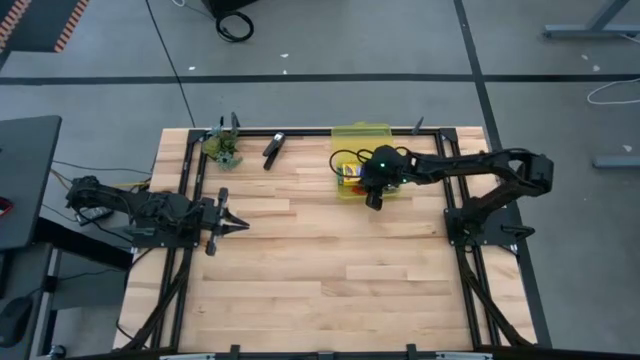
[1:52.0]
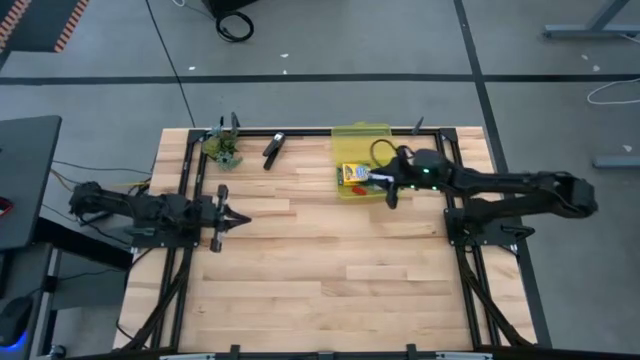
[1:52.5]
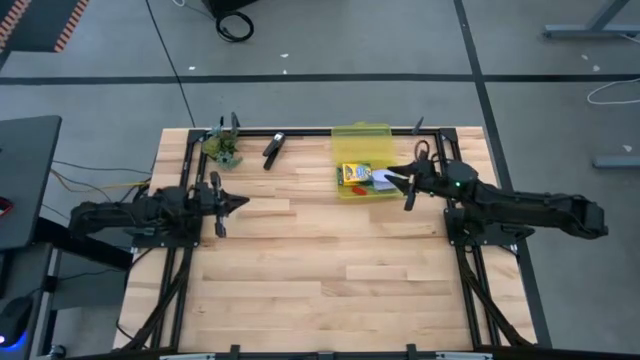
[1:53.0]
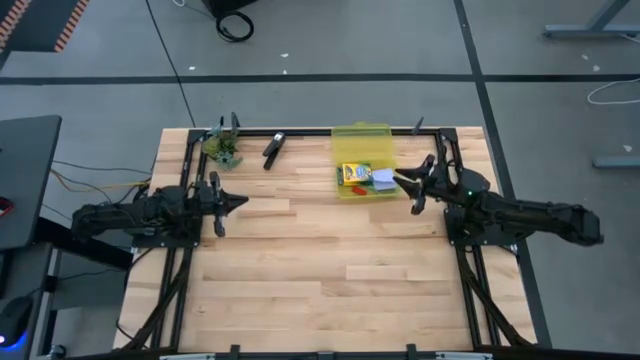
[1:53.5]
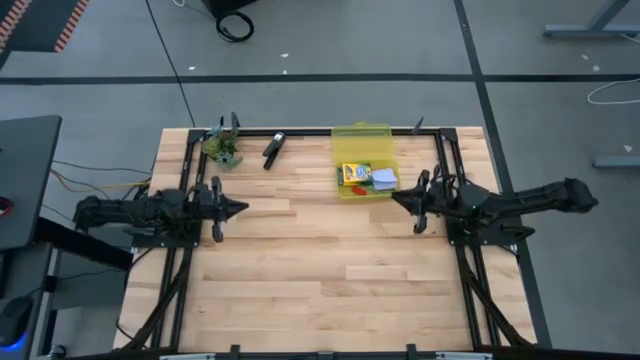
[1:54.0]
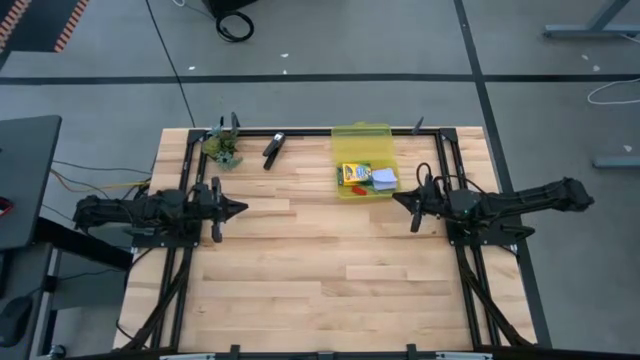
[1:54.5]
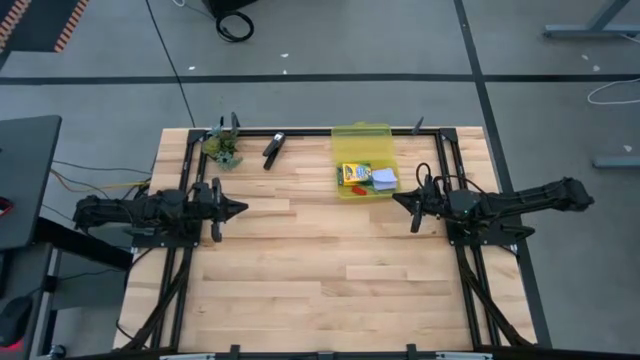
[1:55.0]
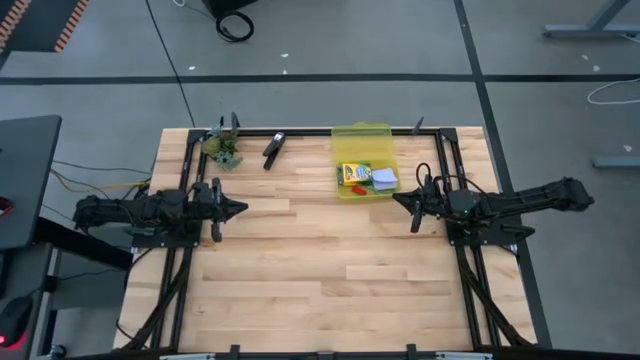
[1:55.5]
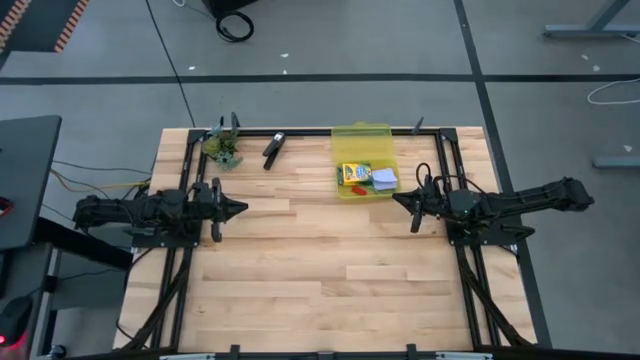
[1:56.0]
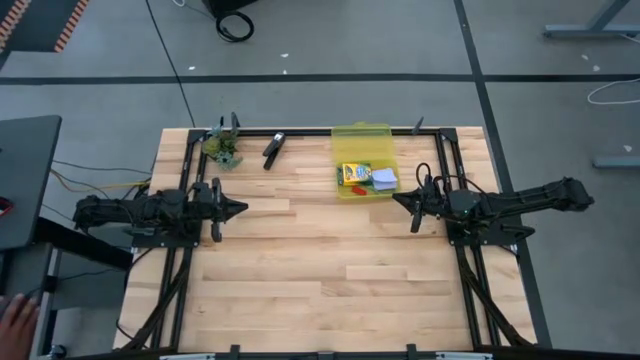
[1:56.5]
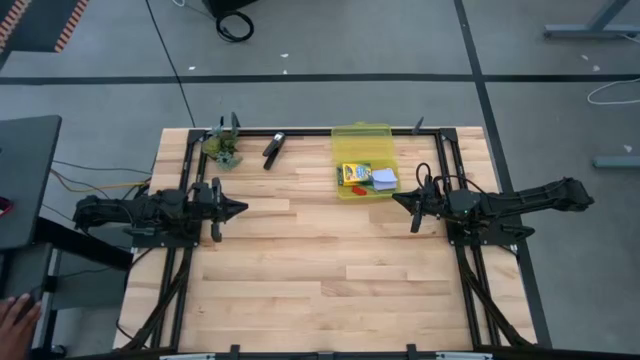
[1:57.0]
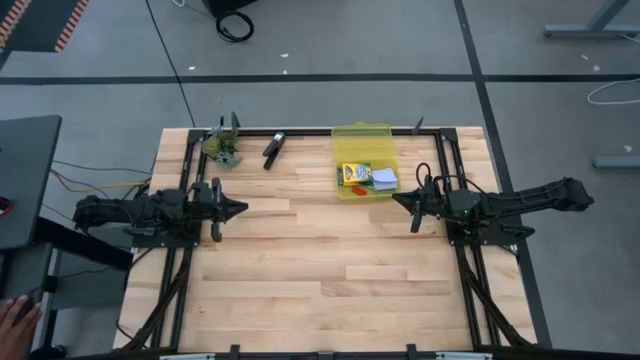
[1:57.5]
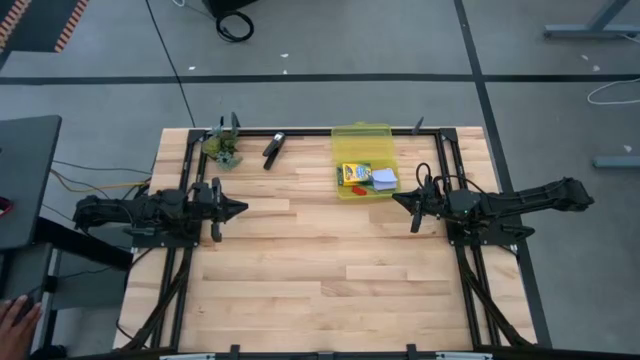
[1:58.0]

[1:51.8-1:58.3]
Task: Pack school essentials
Return to Home Position

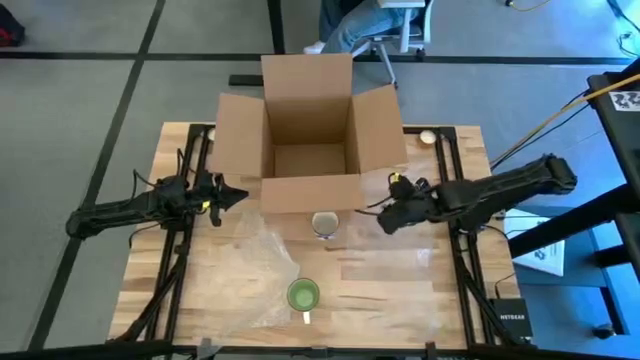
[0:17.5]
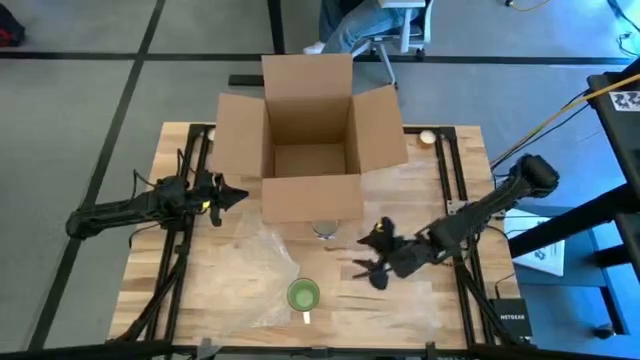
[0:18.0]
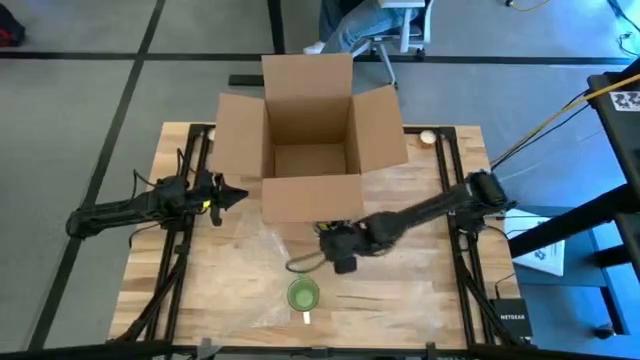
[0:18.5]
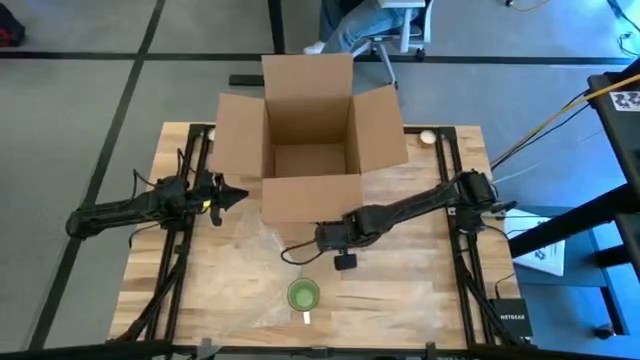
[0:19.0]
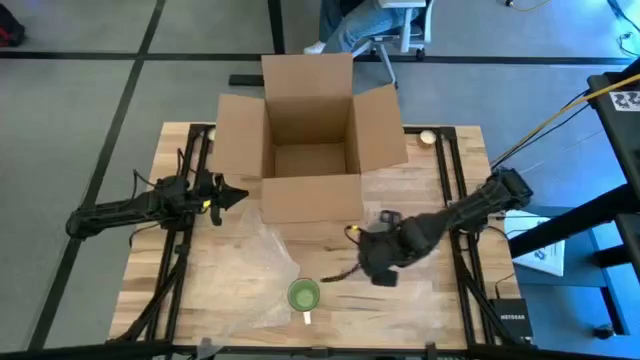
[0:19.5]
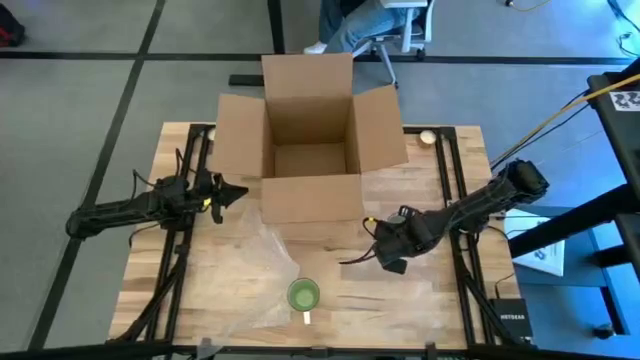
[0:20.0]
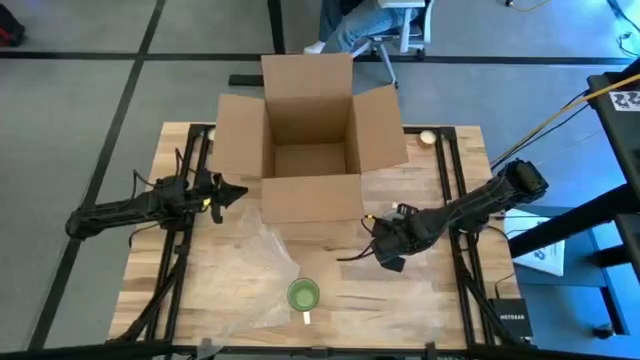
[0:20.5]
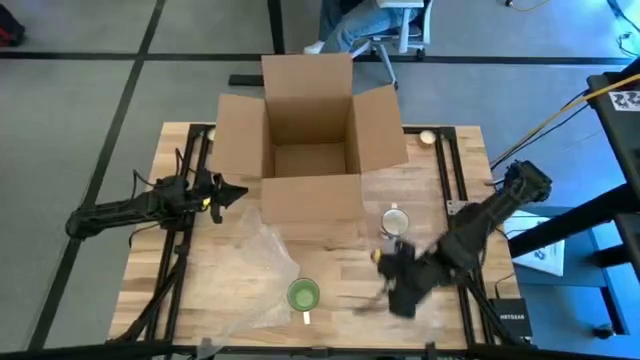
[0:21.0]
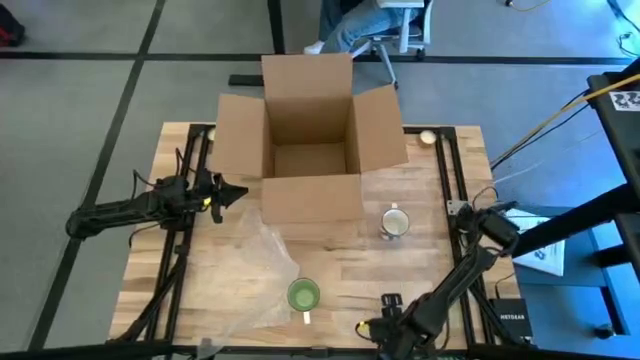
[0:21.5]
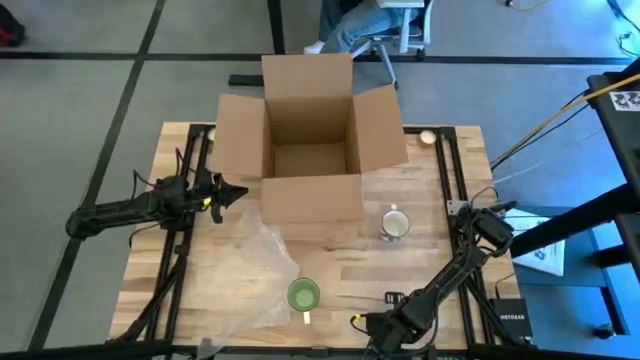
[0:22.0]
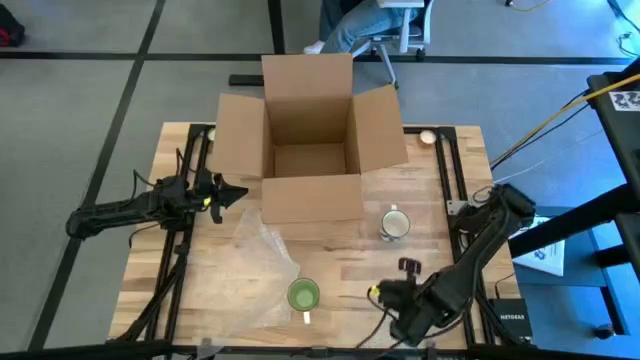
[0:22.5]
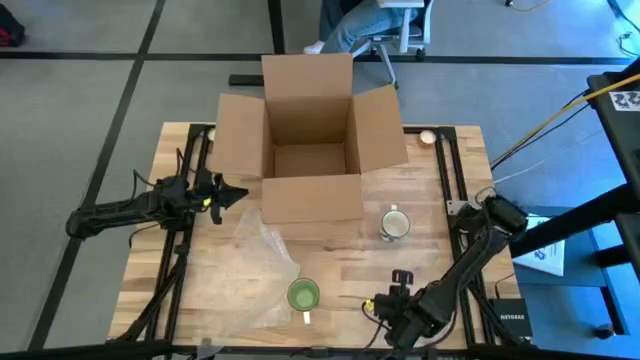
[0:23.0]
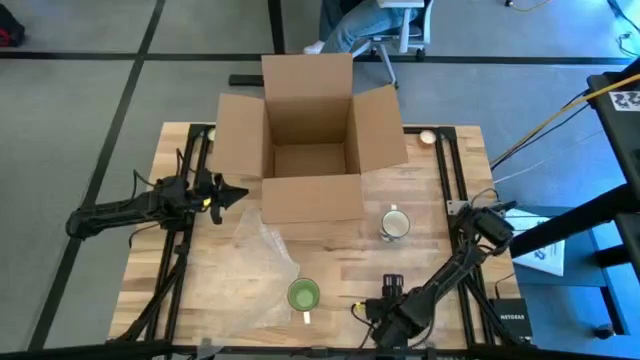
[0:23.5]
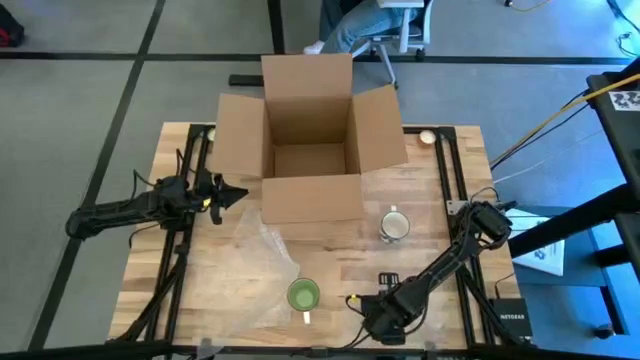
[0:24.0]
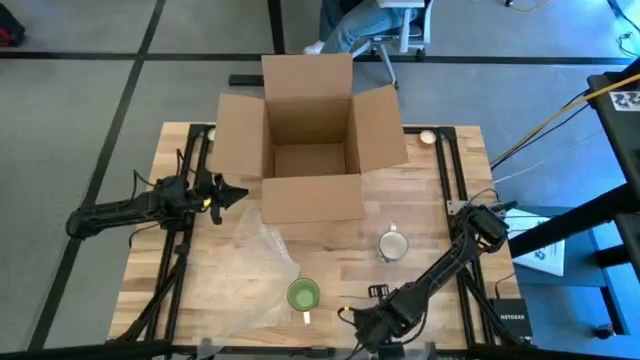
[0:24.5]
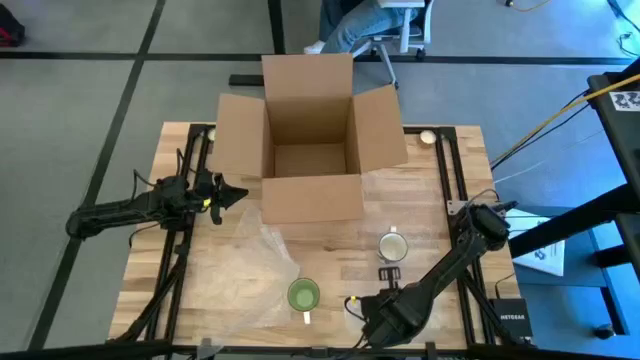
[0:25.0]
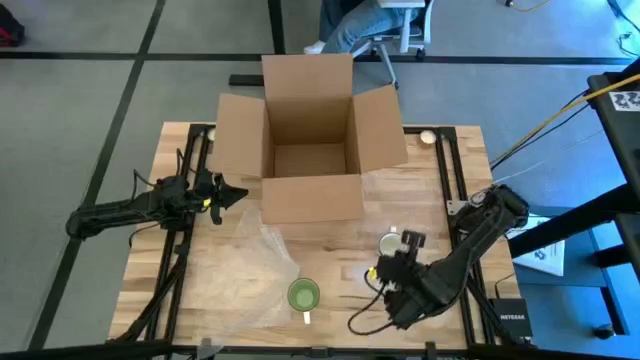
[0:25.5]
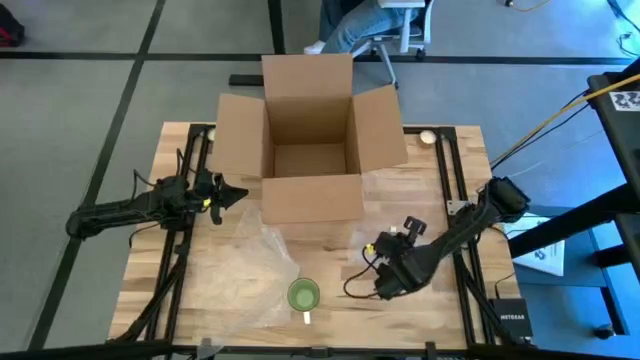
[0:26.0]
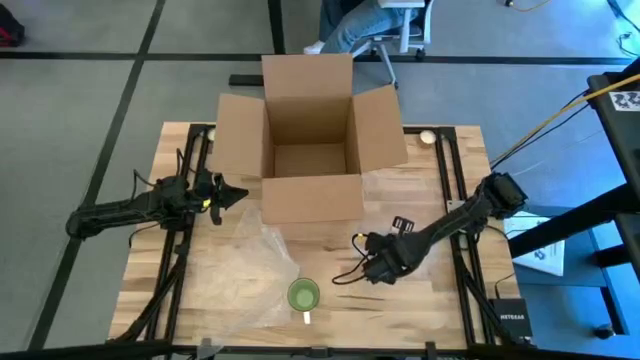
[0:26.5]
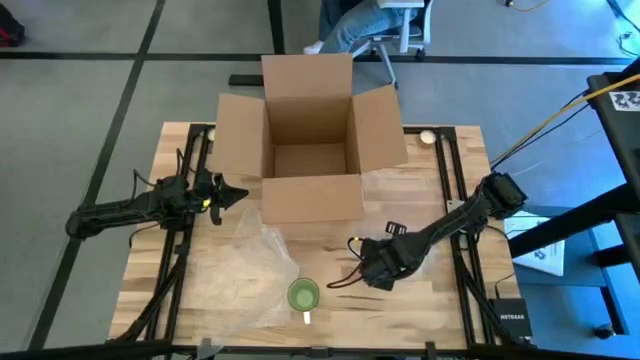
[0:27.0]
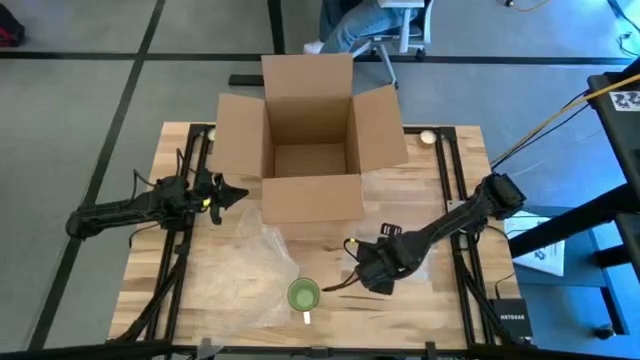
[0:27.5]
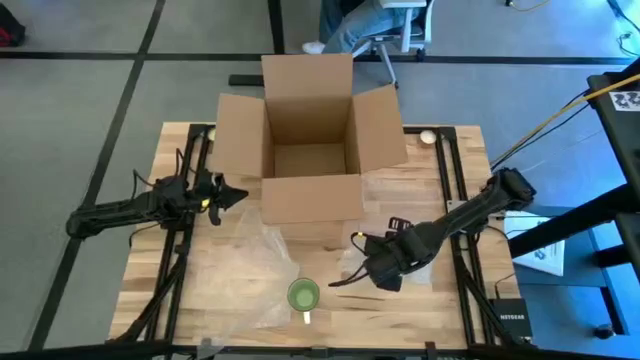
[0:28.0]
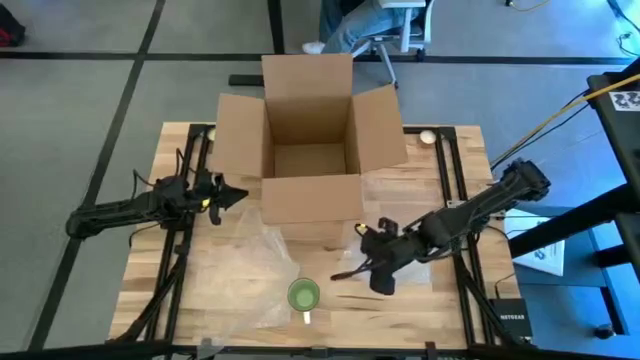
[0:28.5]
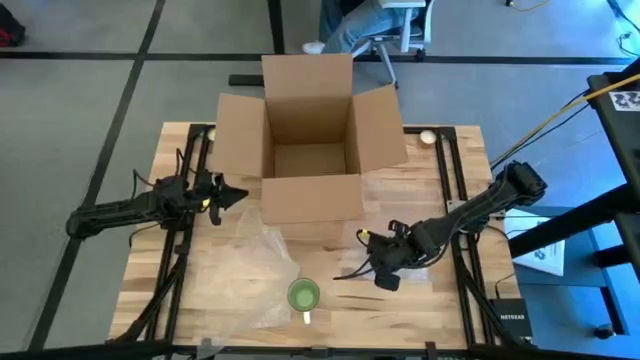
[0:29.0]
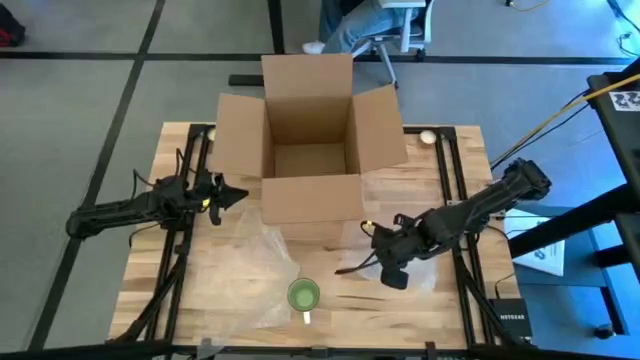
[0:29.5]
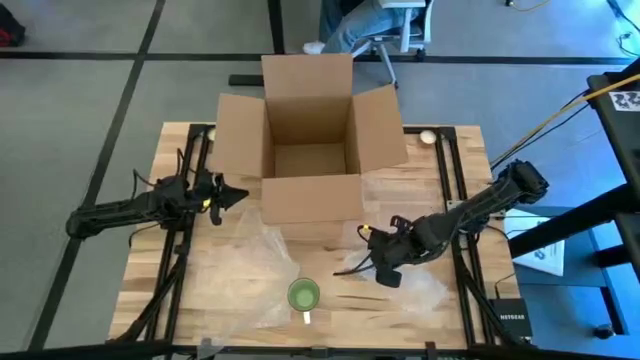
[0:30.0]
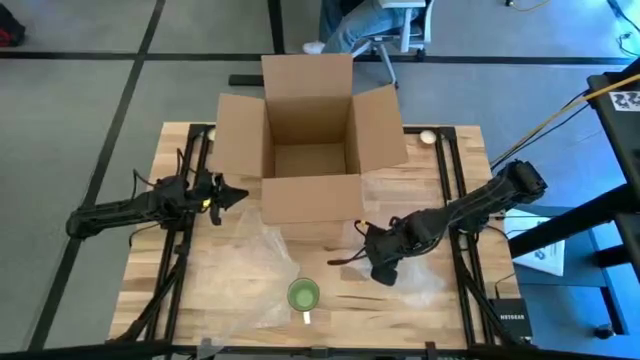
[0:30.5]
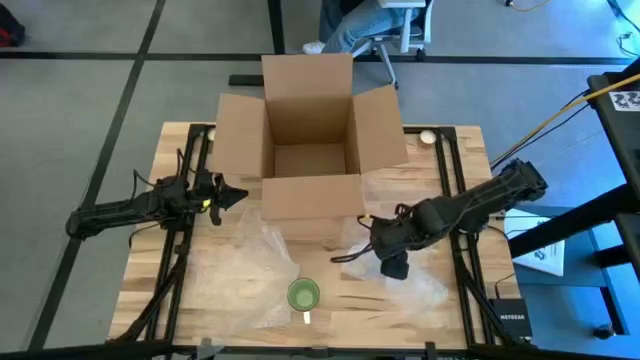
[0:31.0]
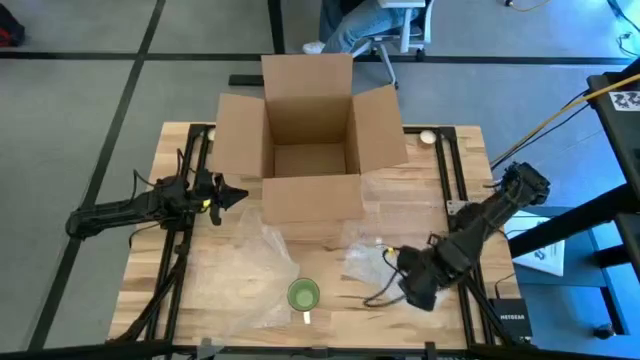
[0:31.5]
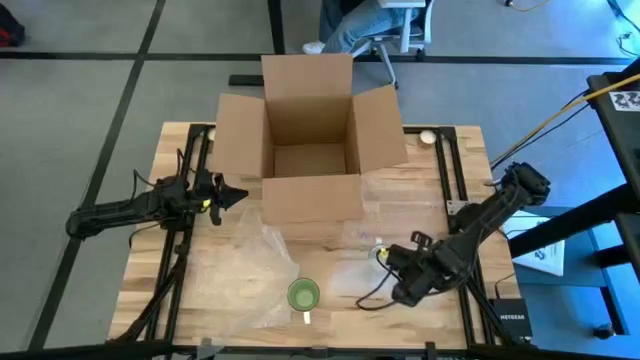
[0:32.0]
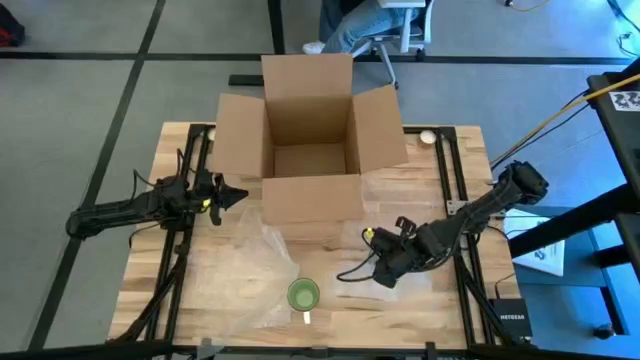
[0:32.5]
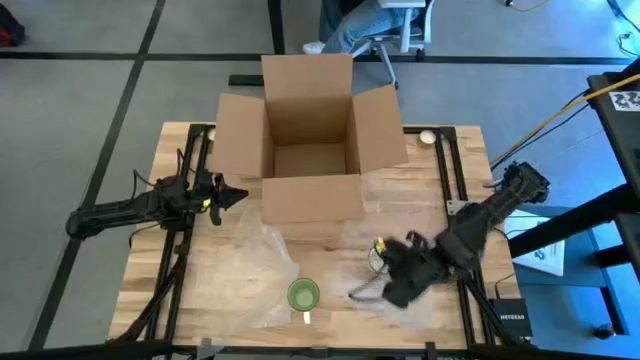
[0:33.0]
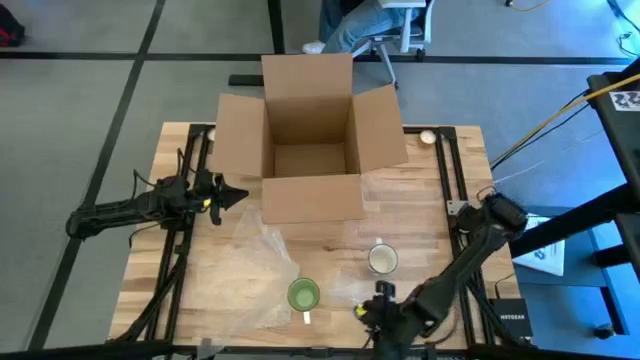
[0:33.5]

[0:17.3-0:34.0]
Task: wrap mug
Wrap the blue mug with the right transparent bubble wrap
